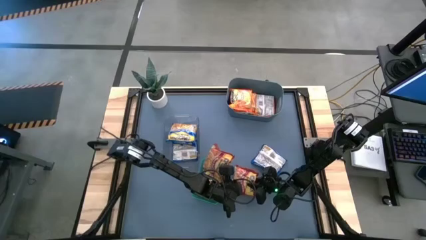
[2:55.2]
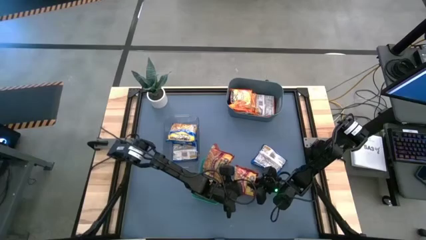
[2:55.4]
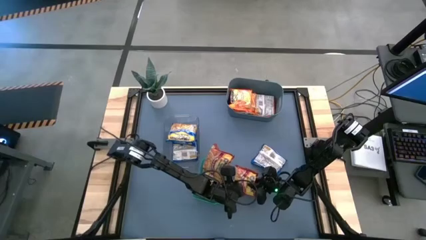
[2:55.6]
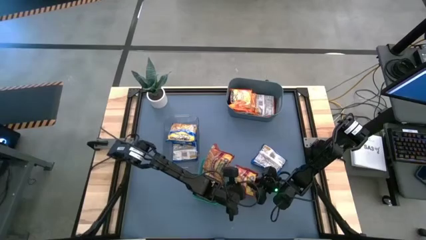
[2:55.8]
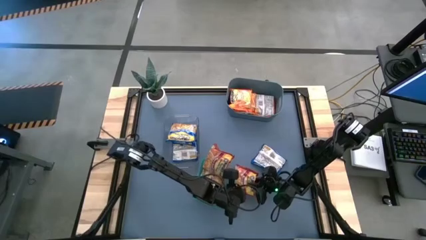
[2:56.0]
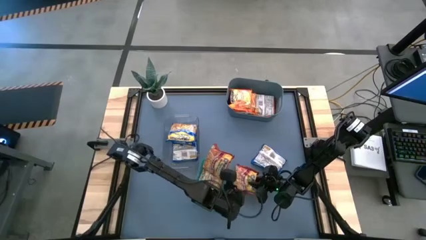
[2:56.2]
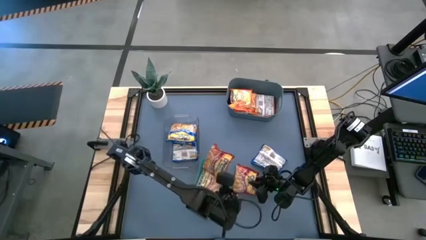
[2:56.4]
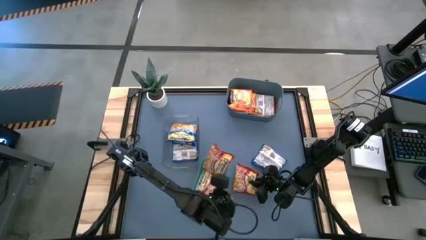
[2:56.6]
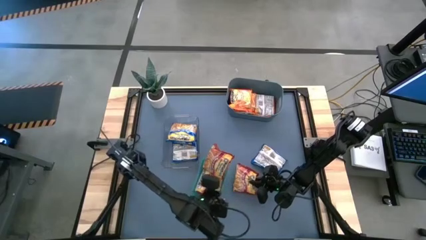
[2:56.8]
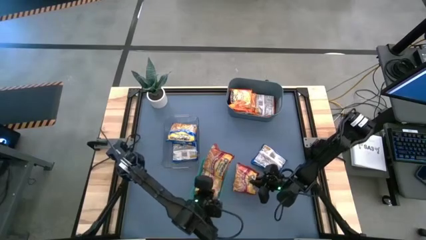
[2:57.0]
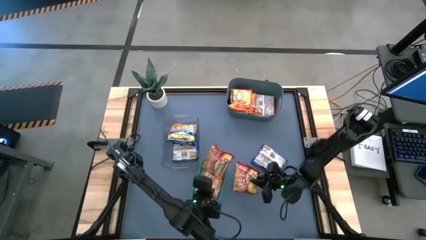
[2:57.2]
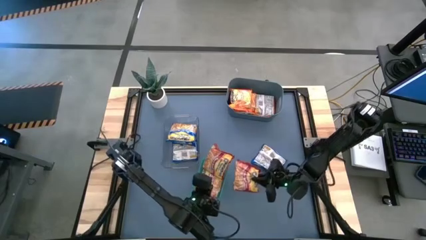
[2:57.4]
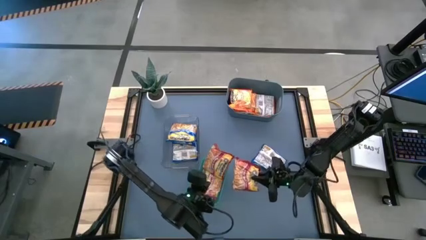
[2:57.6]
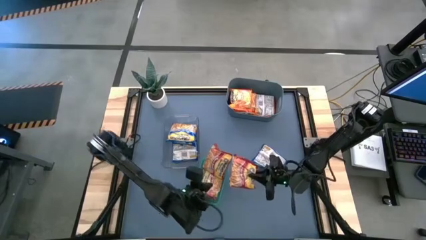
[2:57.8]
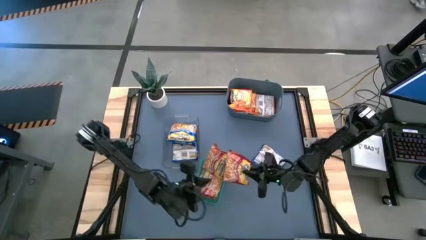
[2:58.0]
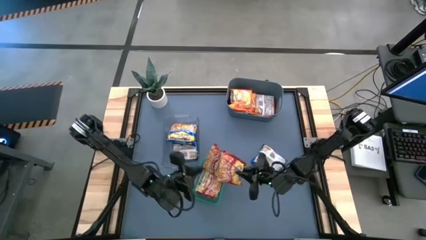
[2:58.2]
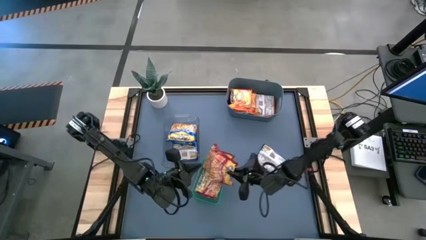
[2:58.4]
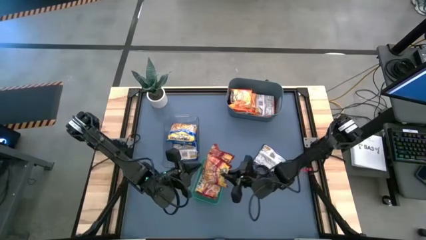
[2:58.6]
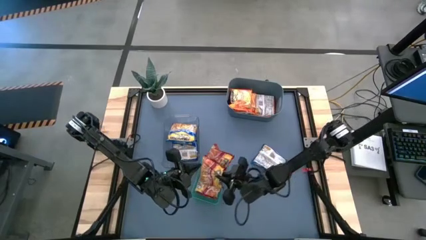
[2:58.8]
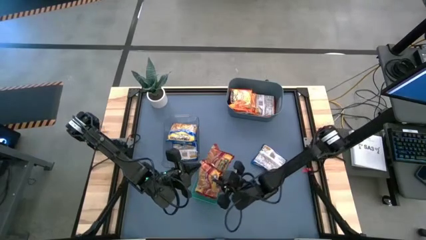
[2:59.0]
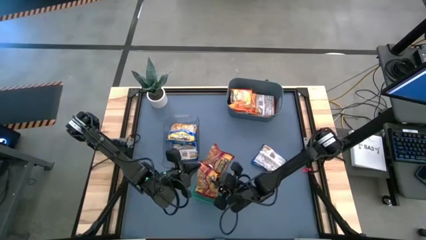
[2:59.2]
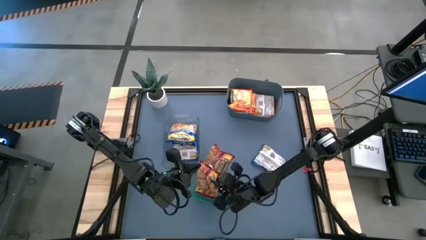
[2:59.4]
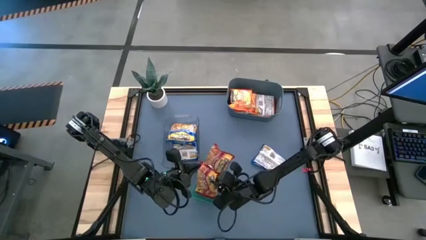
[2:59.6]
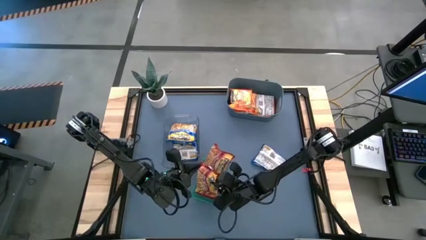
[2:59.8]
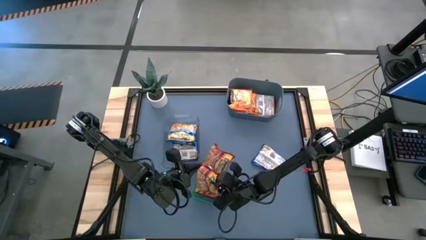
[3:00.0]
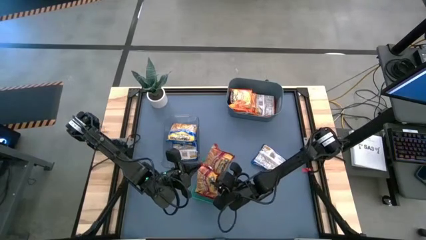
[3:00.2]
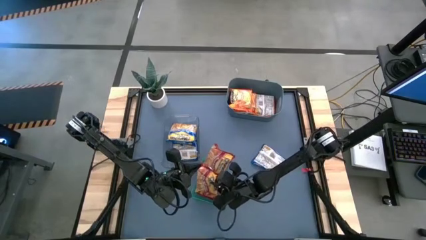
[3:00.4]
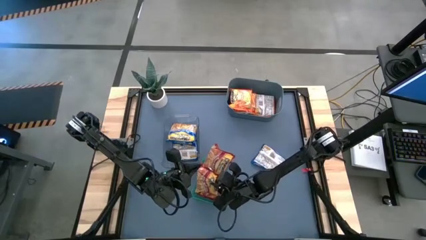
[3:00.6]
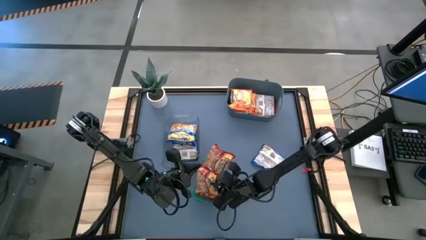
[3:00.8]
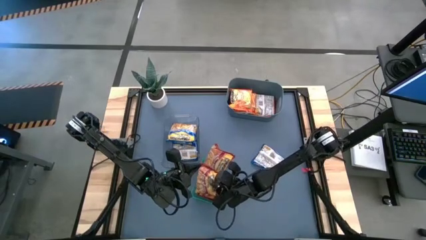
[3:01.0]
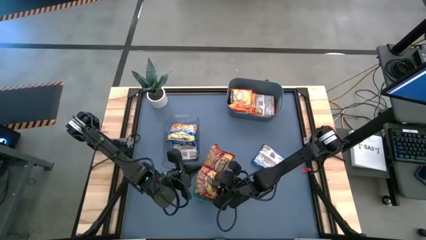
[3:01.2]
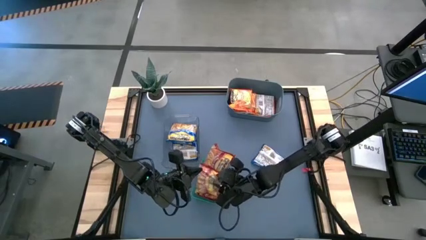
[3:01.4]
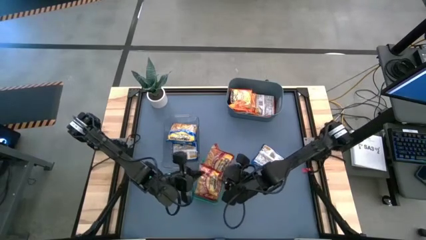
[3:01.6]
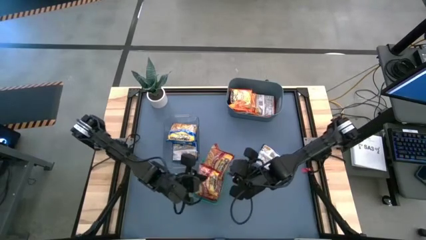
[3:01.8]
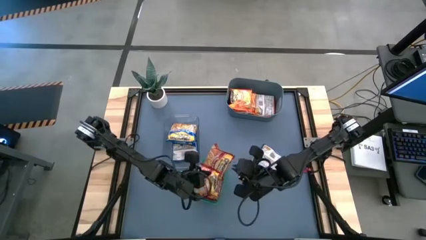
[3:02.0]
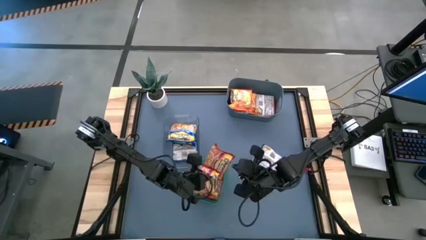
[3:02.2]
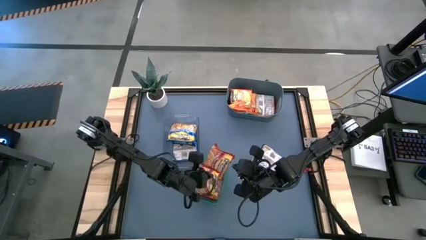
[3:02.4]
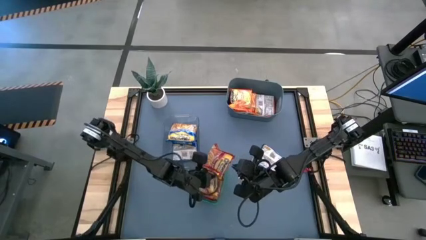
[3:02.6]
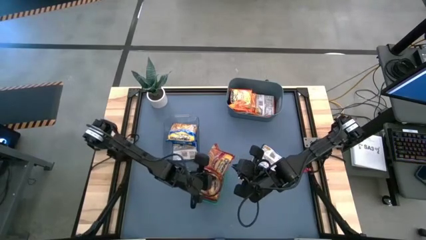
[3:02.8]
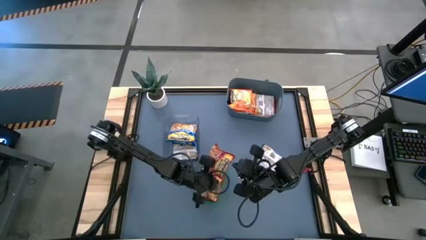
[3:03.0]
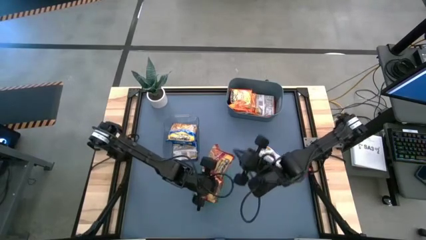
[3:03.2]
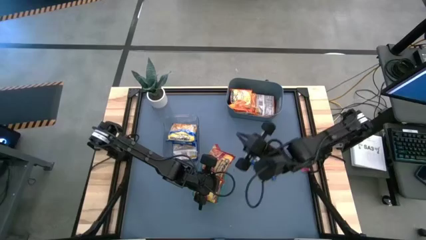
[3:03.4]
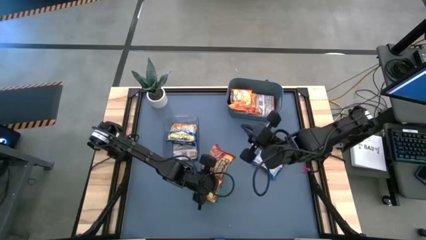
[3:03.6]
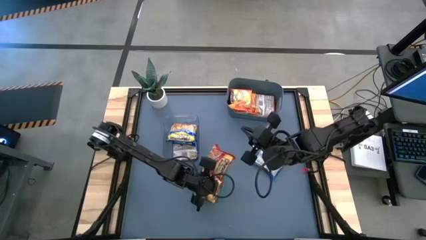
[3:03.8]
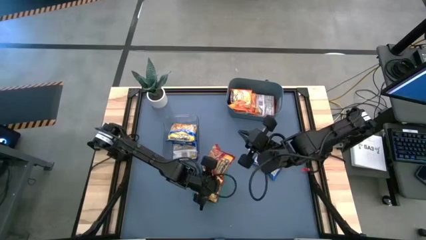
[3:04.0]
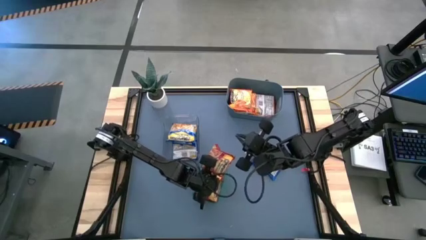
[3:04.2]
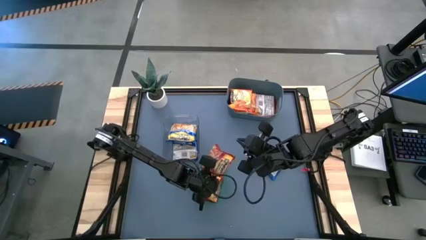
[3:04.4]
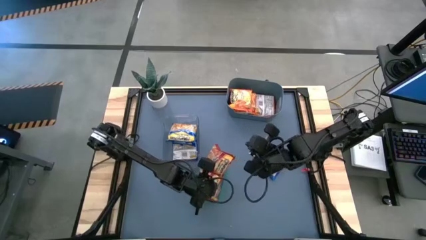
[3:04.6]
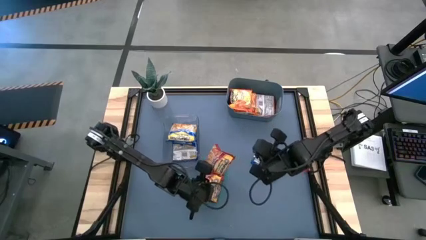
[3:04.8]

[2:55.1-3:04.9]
Task: Sort Maruchan noodles
Put the red noodle pack into the green bin

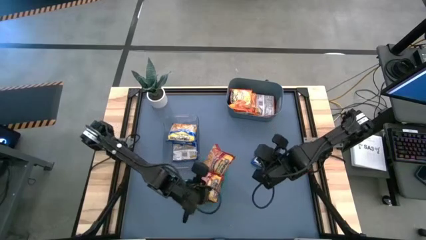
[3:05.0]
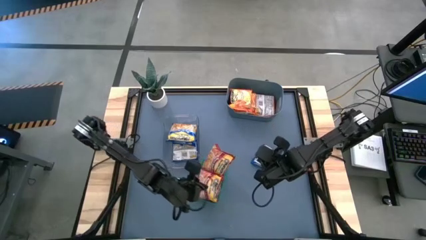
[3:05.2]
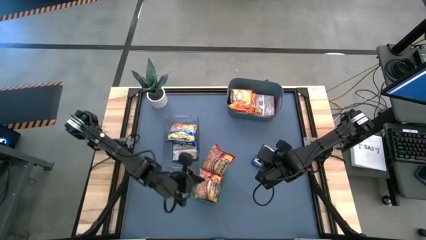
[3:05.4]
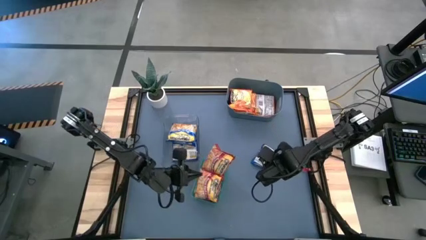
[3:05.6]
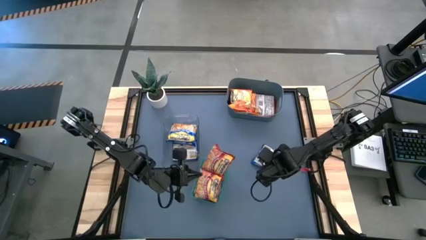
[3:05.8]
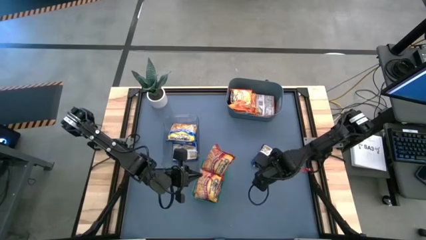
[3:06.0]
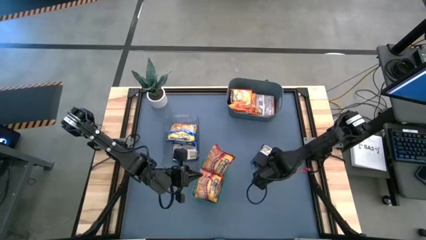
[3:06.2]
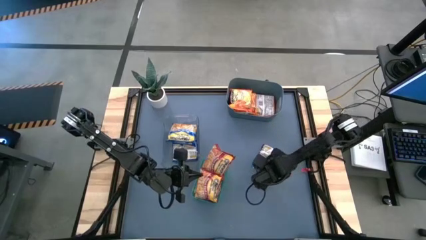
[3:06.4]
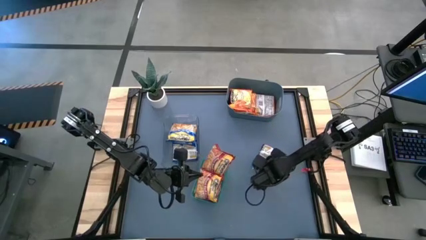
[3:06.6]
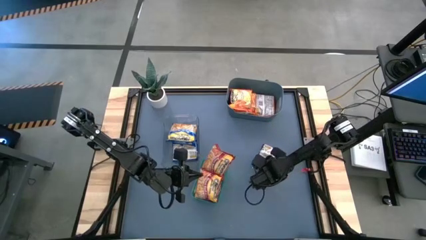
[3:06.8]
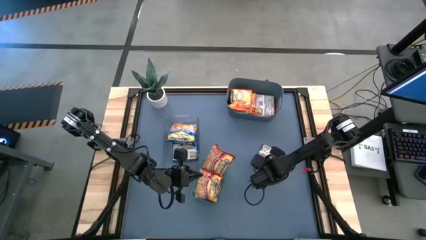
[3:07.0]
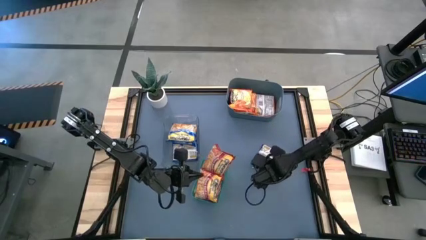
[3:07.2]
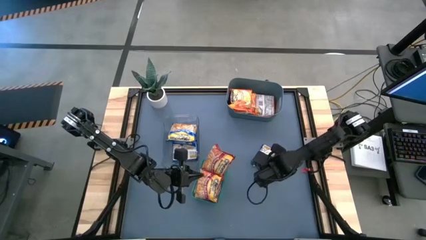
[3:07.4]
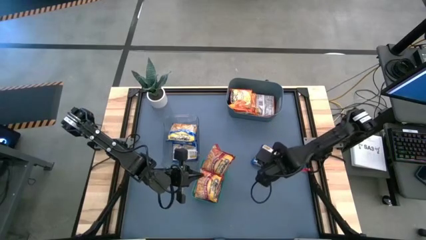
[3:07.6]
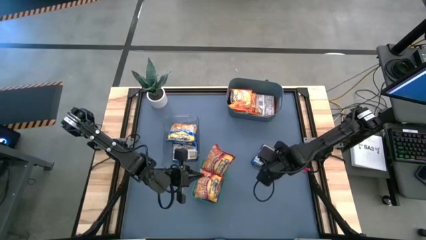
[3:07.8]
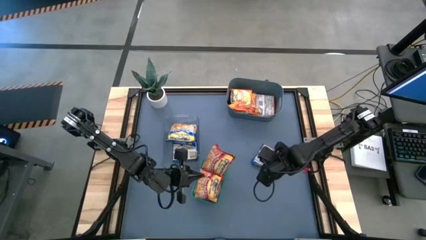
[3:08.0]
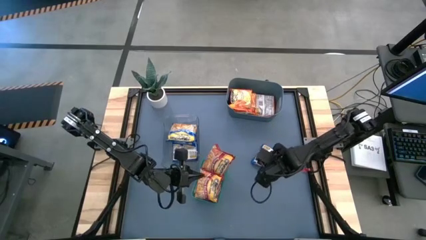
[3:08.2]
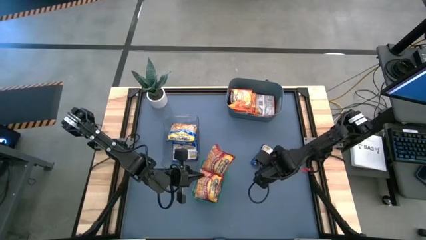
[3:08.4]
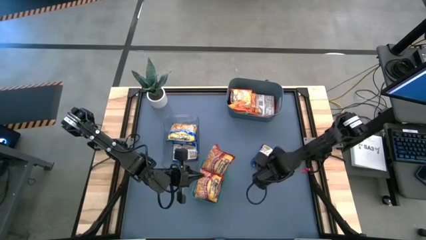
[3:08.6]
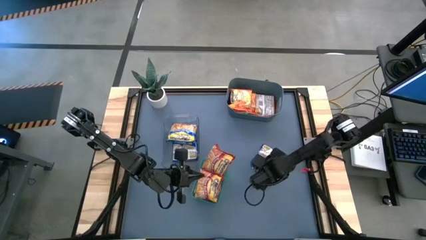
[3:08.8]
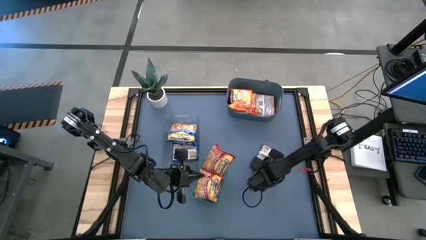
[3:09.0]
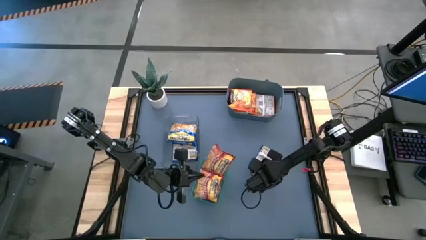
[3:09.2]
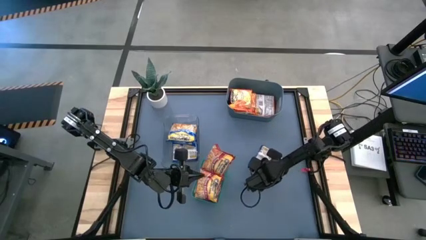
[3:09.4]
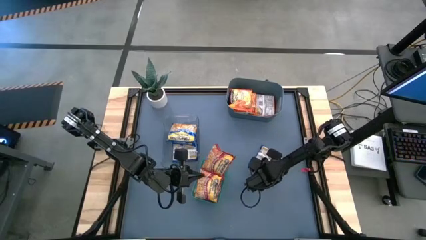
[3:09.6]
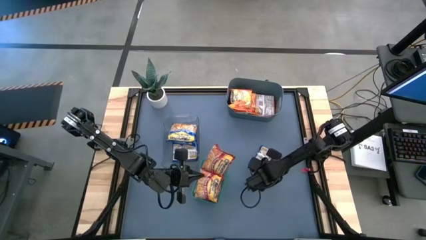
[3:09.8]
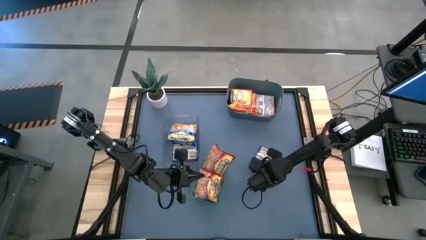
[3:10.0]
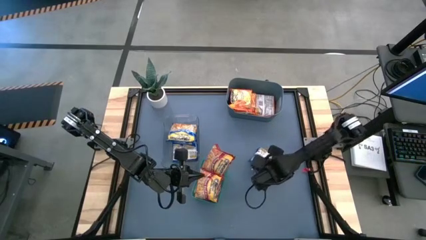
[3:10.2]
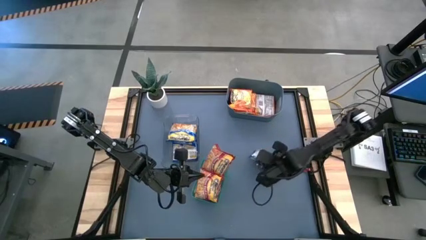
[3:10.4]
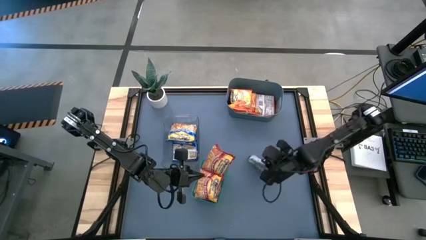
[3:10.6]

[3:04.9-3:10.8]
Put the blue noodle pack into the transparent bin

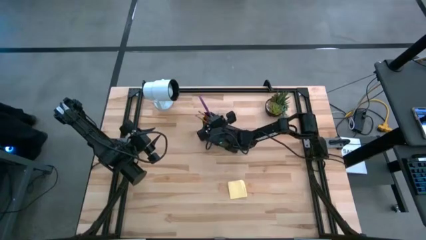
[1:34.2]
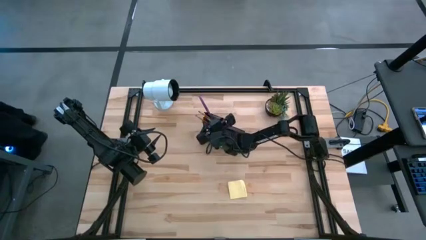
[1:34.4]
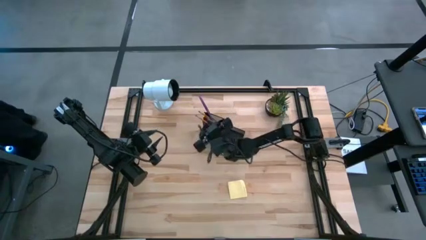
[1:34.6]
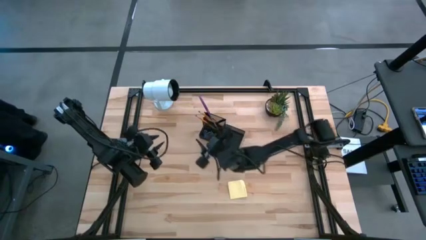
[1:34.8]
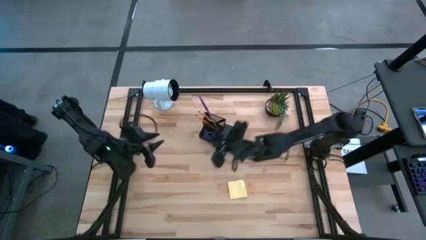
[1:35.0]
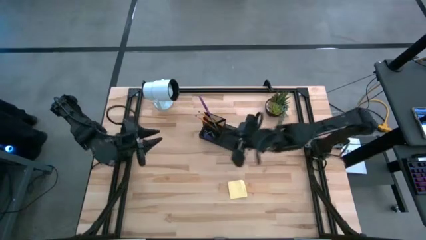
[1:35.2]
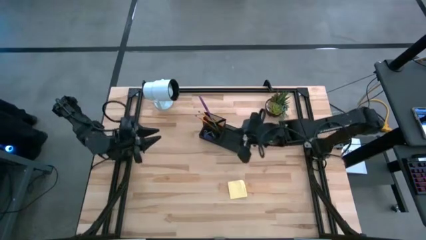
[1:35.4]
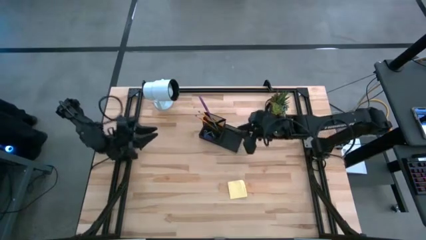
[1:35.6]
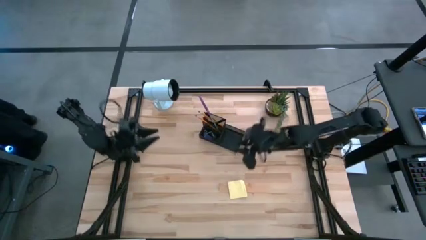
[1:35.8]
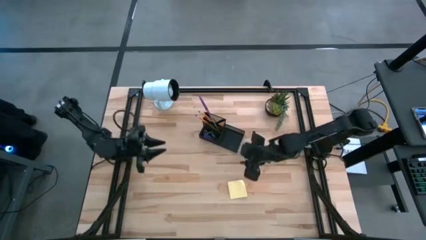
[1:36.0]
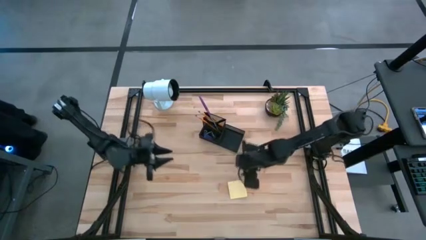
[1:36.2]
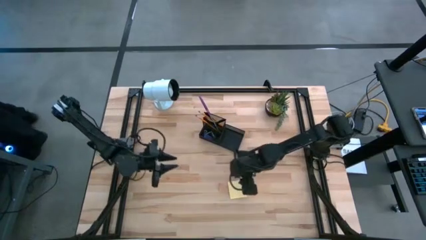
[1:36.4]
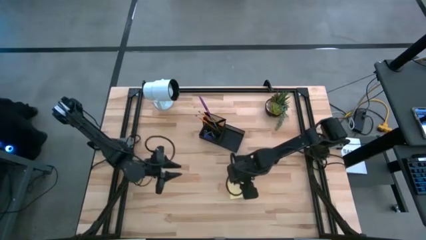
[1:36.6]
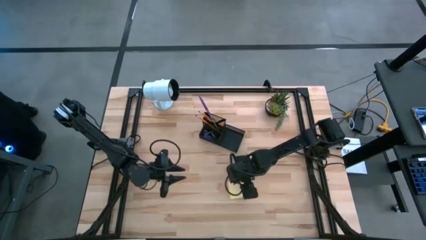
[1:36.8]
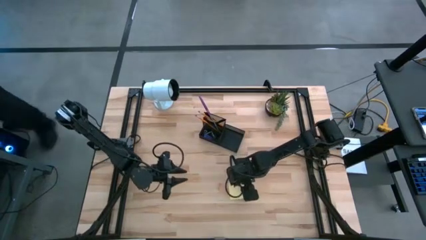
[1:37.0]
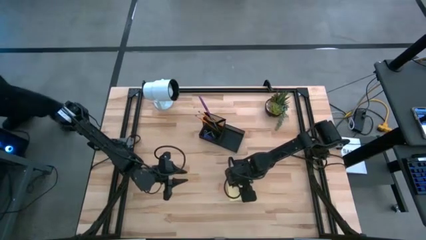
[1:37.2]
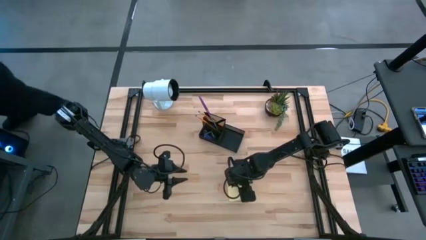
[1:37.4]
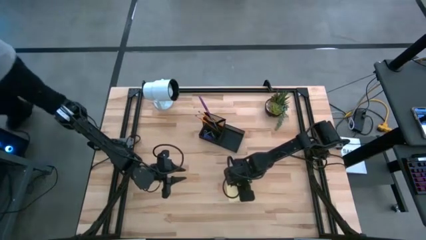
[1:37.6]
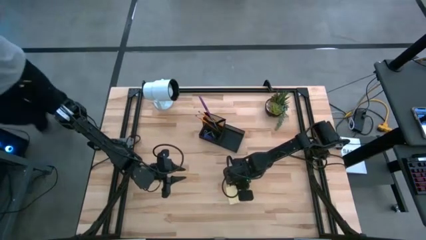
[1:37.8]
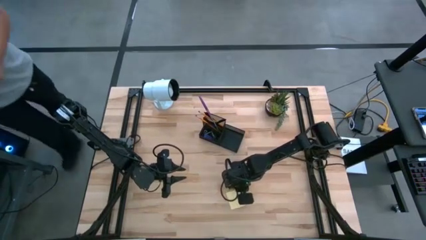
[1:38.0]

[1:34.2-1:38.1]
Task: Pick and place office supplies into organizer
Put the yellow sticky notes into the black desk organizer
